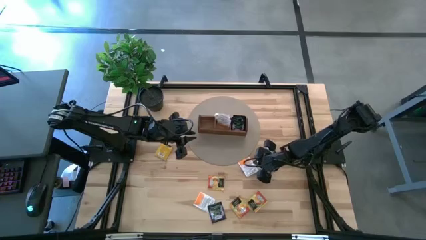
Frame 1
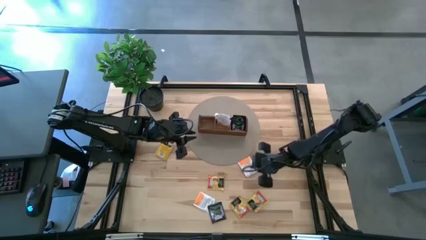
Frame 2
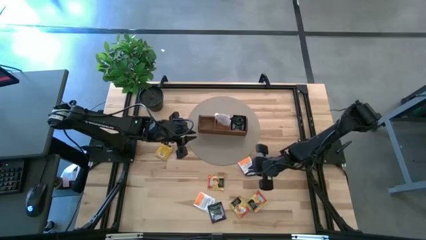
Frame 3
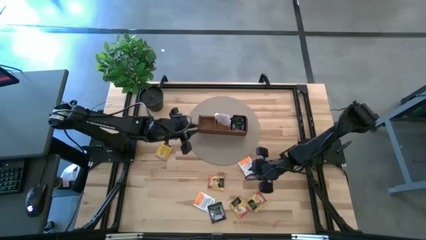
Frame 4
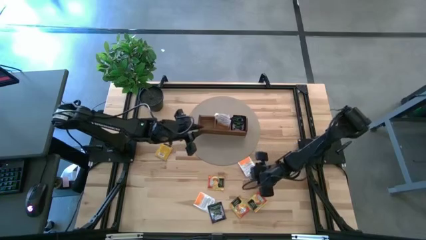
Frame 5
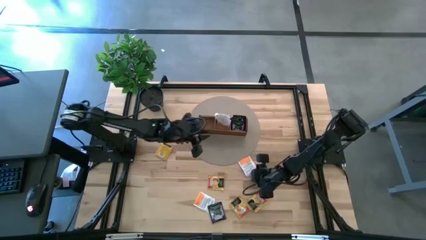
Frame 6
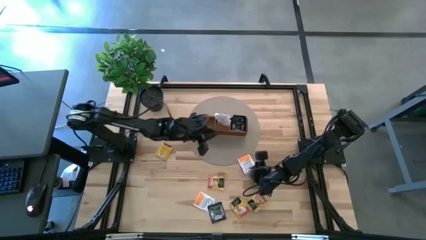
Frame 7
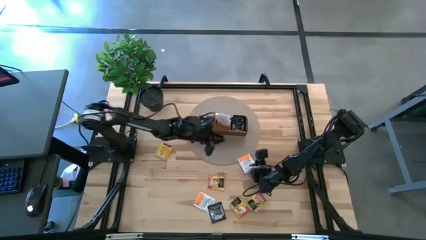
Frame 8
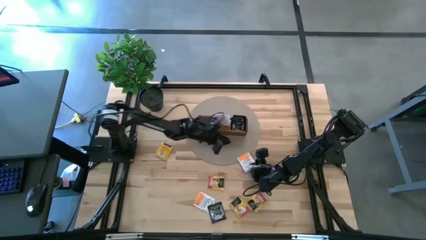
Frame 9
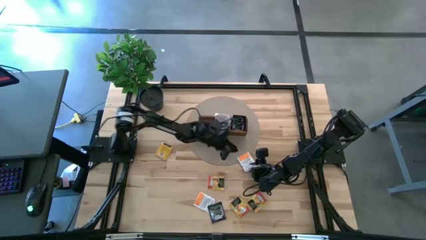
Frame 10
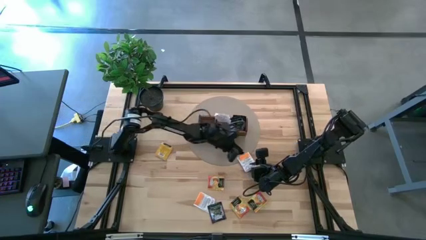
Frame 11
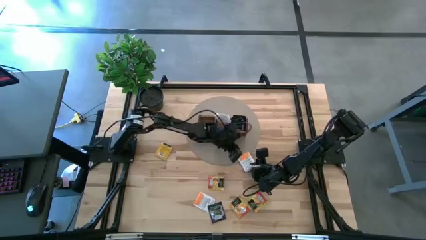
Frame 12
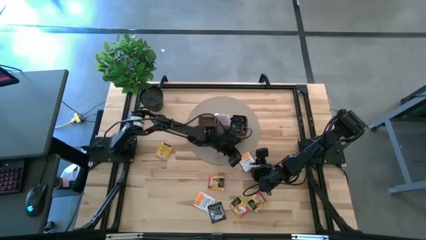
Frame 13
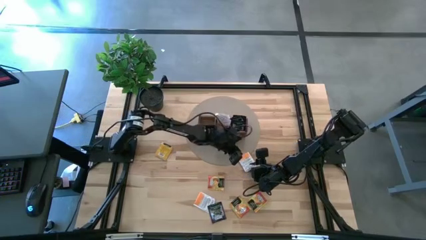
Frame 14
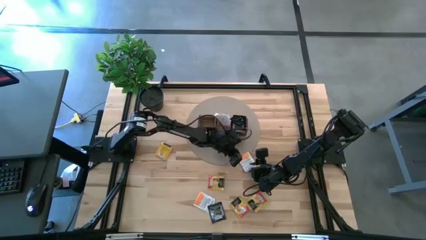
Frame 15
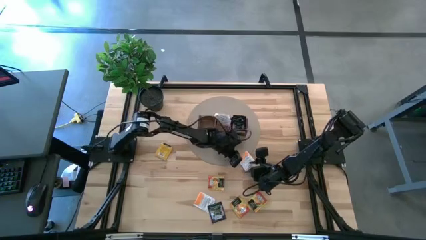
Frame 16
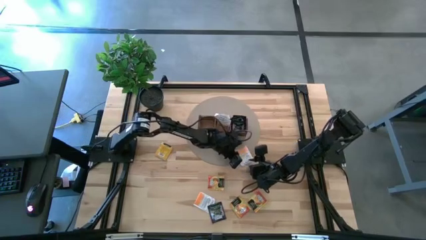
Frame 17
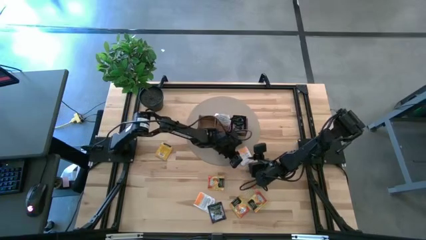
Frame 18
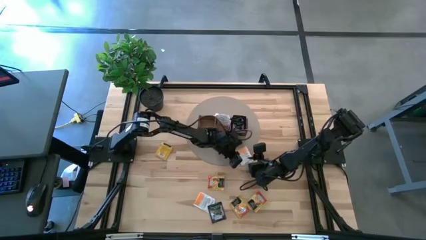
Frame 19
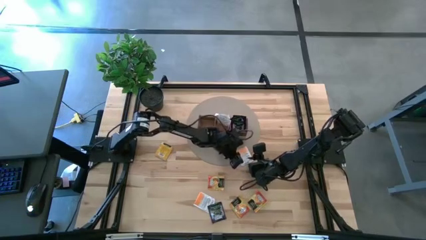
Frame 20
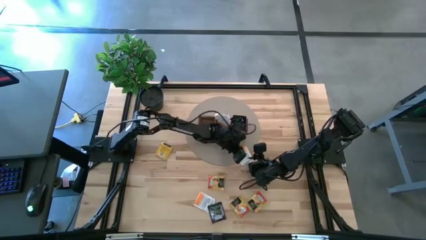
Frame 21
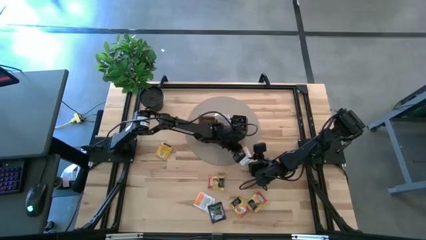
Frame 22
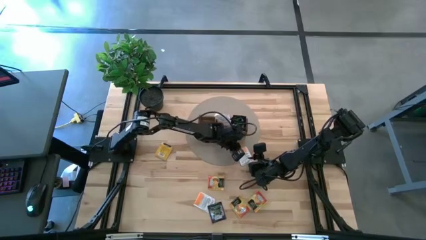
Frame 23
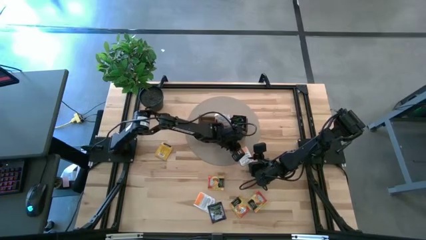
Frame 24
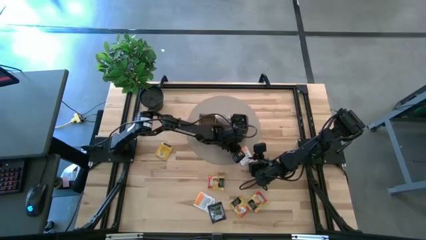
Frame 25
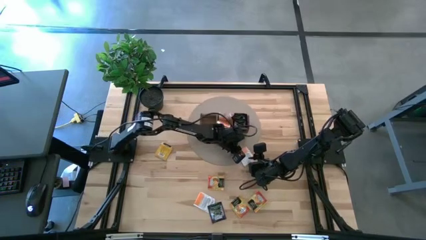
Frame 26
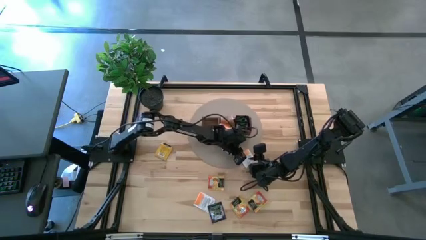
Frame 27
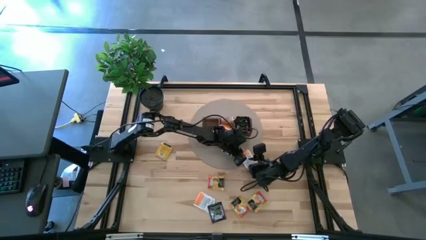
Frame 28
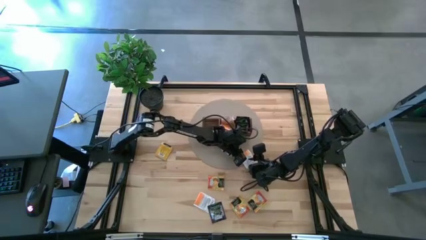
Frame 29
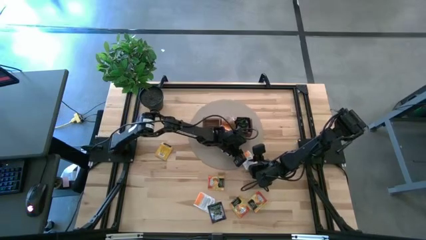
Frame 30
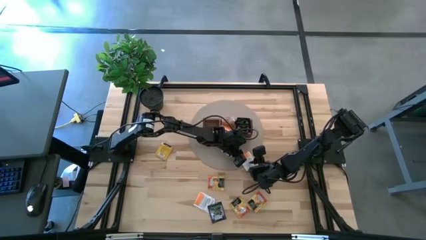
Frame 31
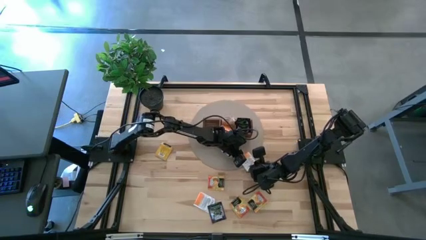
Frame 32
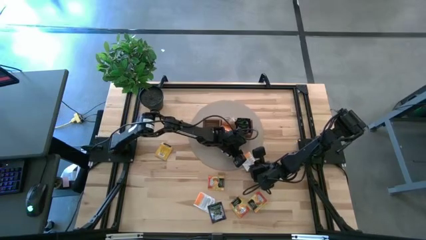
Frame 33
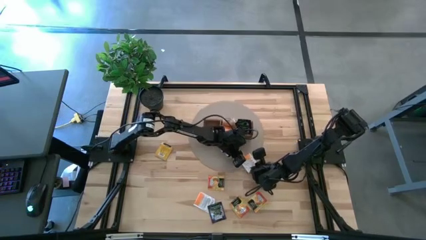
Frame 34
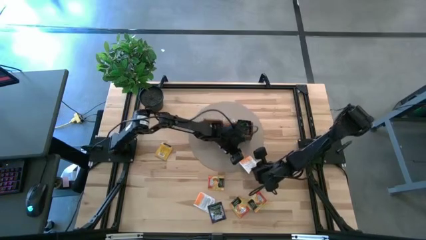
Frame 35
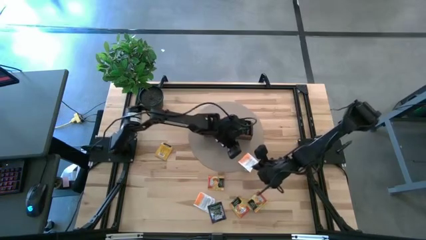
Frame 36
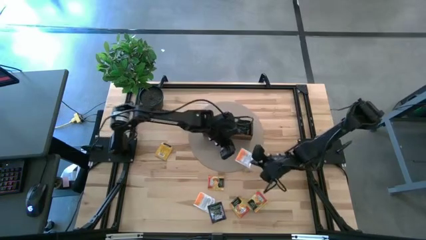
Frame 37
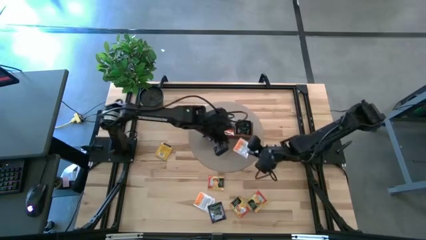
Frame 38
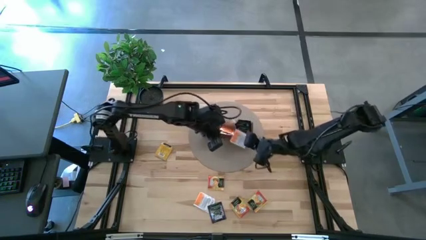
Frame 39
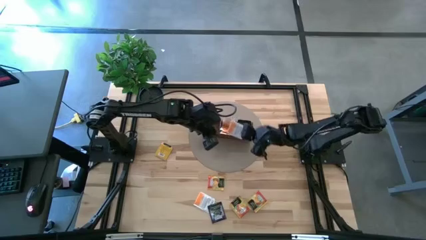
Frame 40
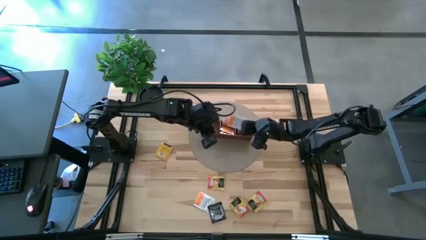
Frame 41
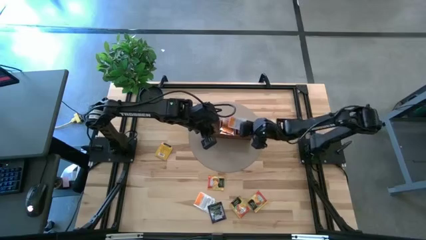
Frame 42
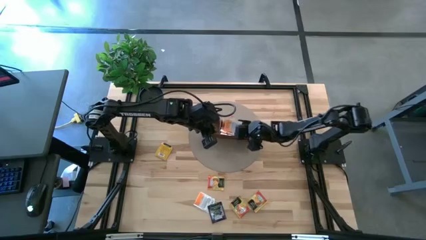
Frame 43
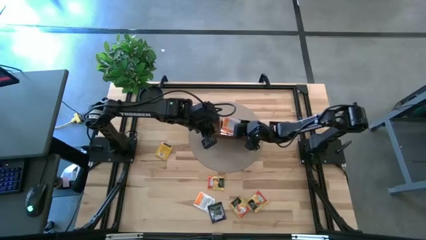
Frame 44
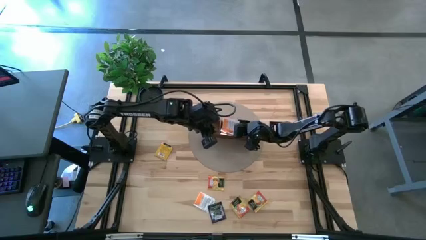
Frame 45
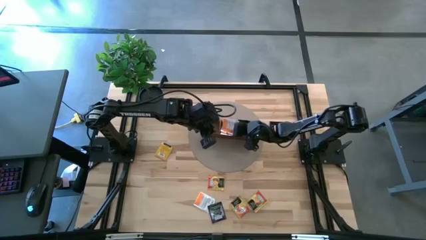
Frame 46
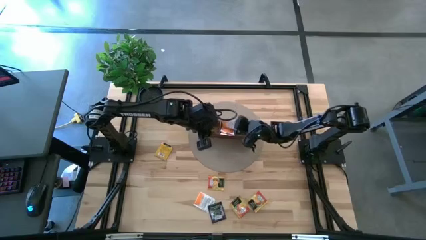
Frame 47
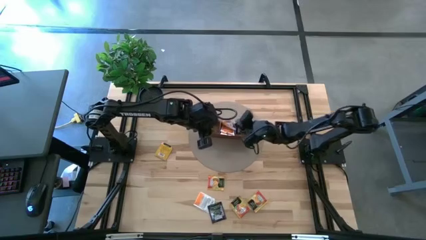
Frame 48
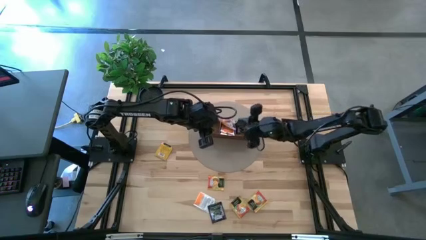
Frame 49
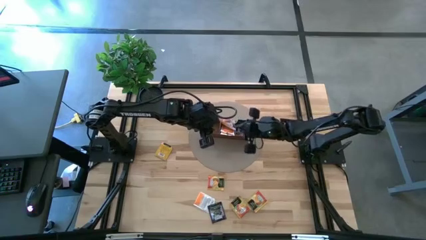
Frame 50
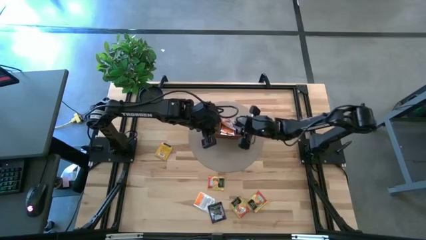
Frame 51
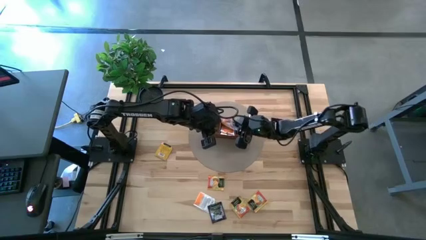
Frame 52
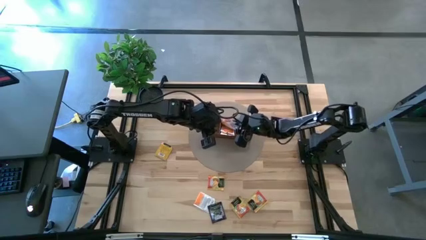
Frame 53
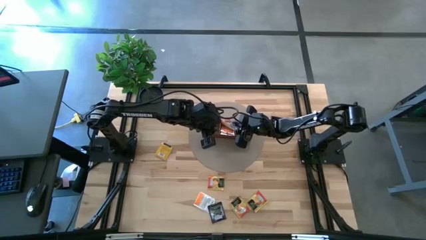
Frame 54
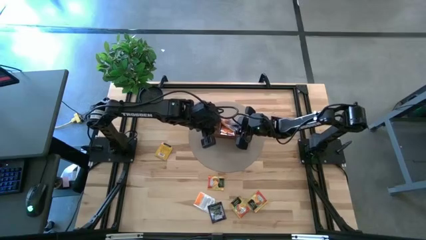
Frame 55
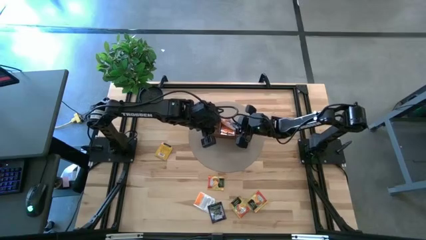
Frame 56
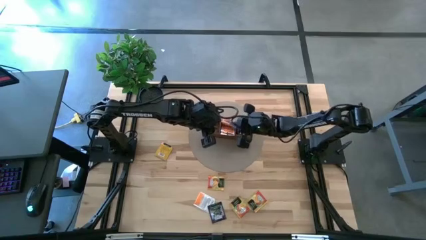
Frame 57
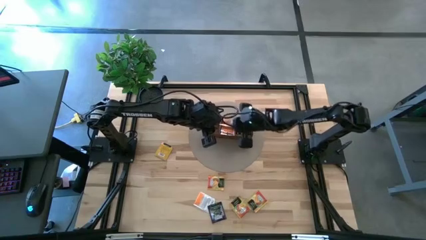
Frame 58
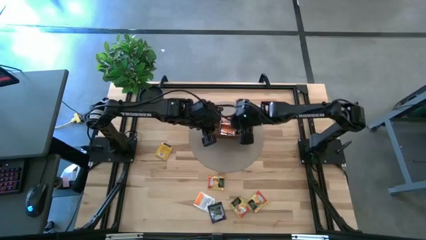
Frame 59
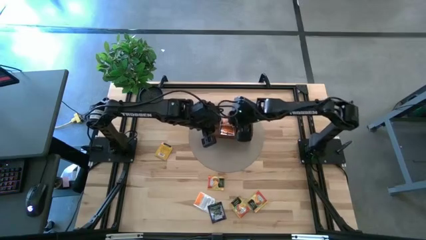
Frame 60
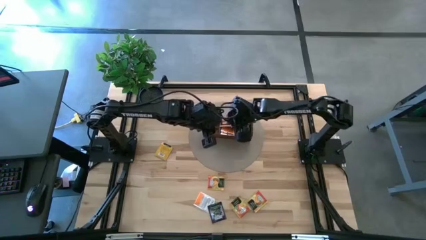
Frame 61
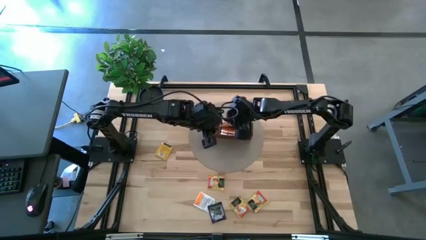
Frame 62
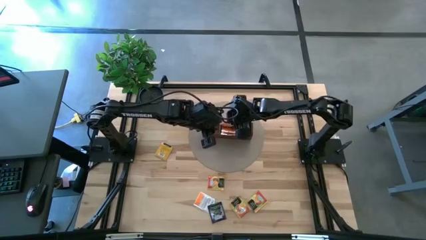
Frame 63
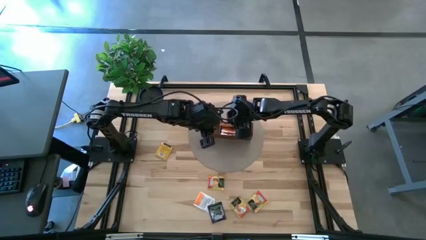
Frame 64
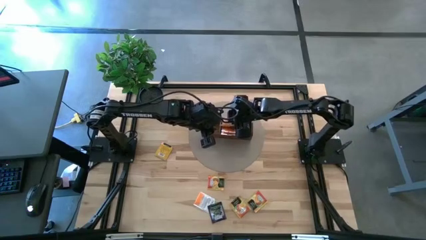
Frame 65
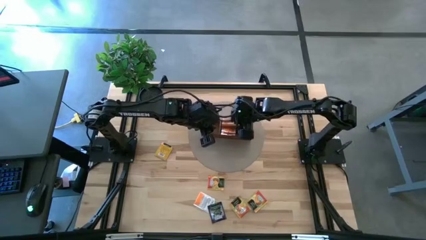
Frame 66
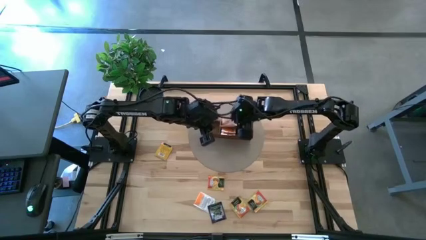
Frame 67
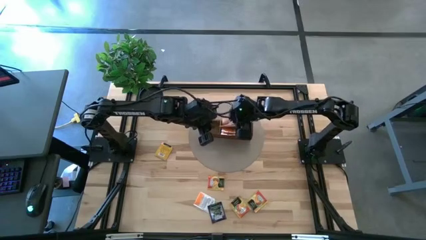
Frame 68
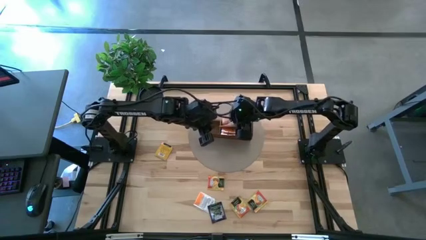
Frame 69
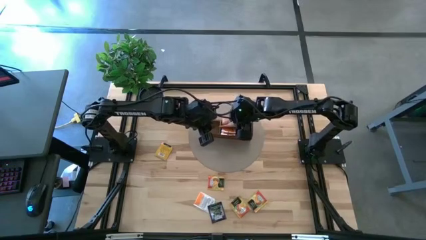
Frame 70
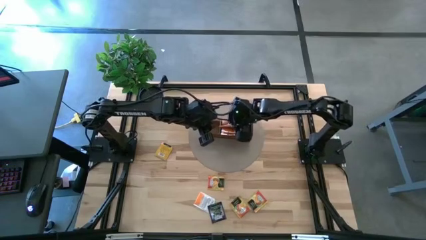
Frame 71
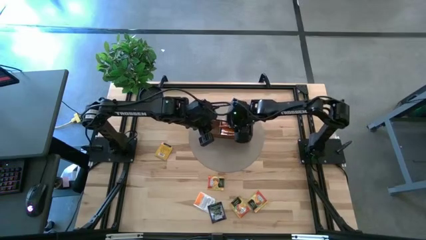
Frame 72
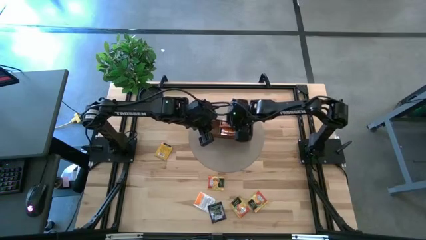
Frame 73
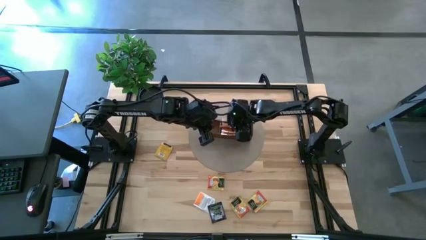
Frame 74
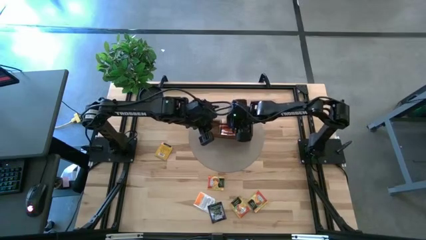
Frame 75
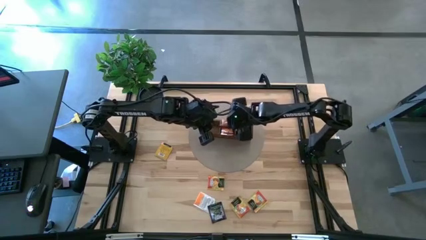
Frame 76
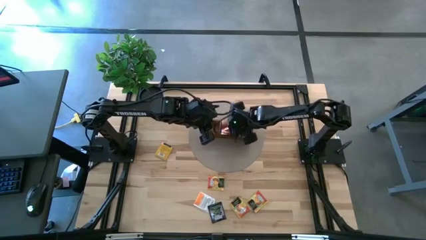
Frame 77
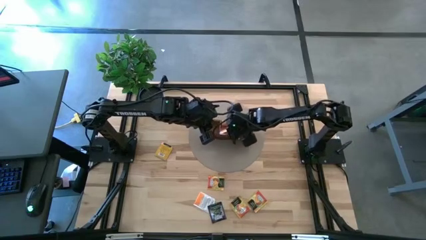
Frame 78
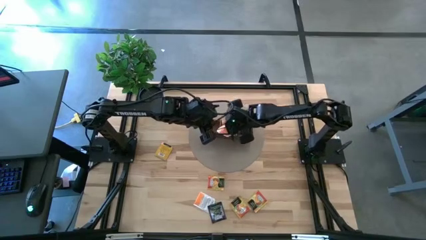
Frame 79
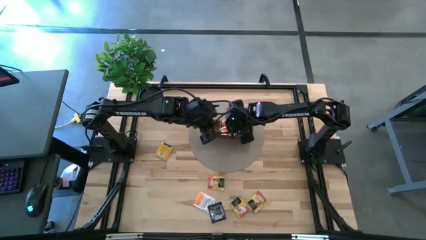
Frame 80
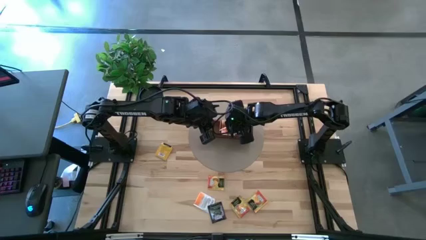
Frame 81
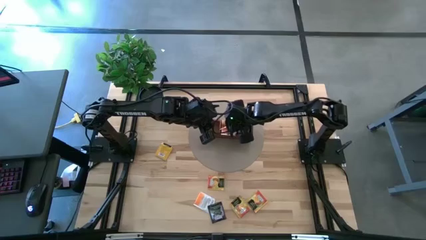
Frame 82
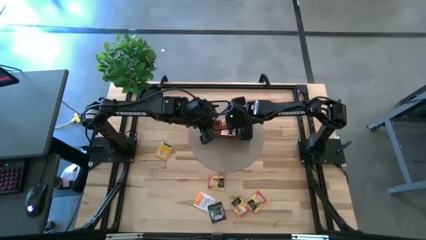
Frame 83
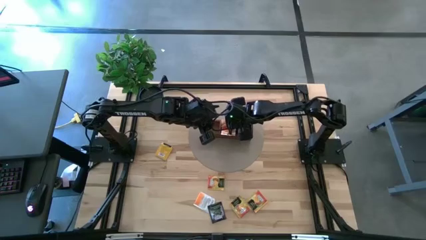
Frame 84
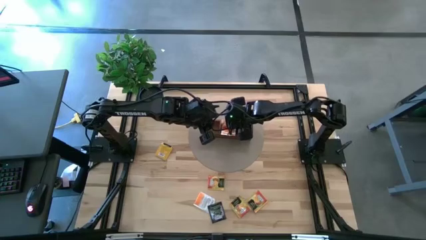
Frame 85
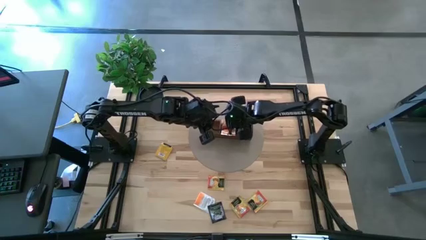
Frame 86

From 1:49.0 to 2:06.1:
Task: Pick & Place Tea
Put the white tea bag into the middle section of the wooden organizer

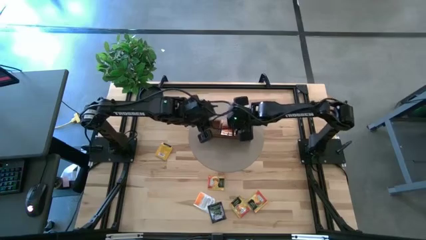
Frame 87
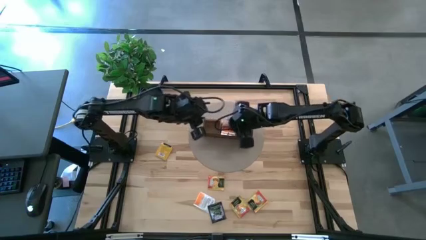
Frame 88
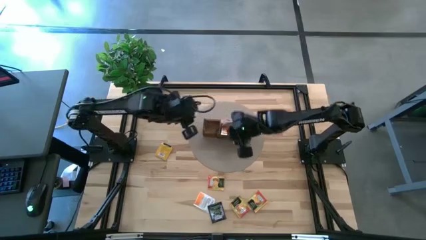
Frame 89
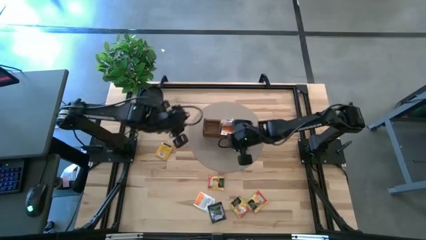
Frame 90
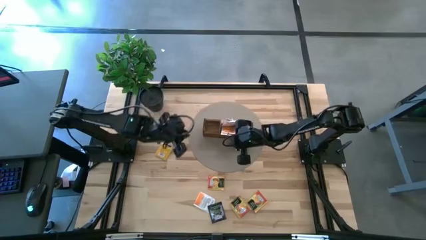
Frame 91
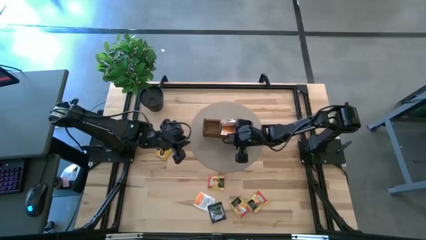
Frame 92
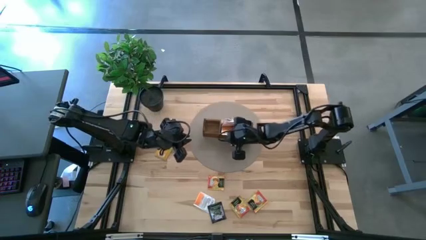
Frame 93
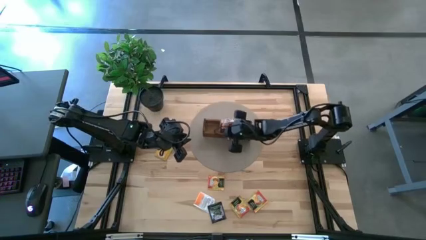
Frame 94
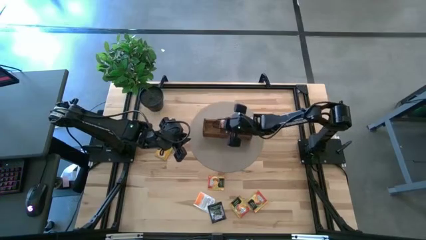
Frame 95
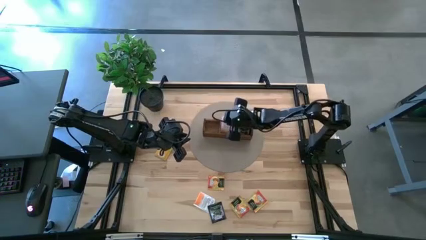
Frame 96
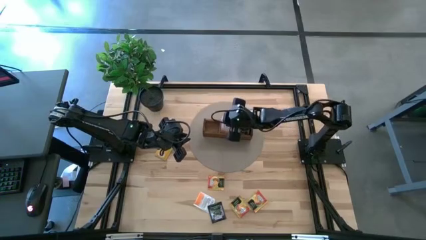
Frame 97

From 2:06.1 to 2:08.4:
Adjust the white tea bags in the wooden organizer
